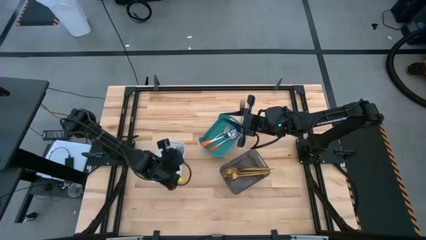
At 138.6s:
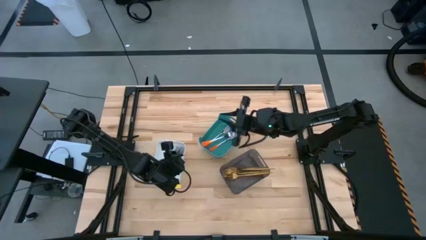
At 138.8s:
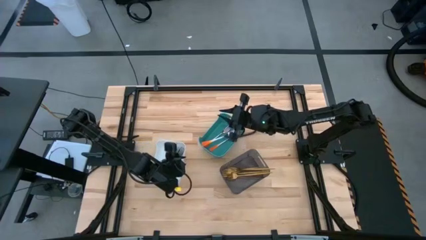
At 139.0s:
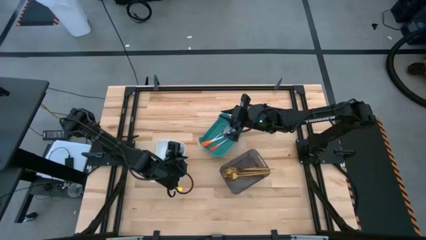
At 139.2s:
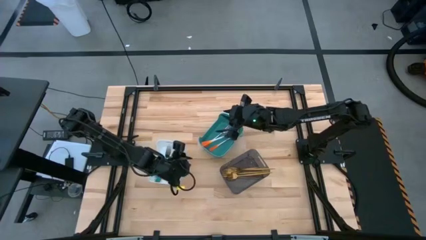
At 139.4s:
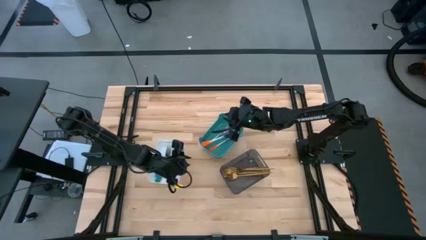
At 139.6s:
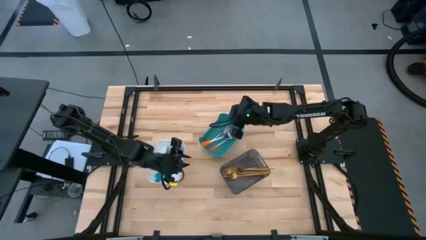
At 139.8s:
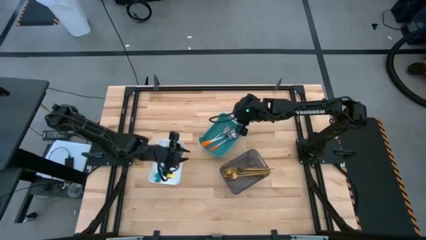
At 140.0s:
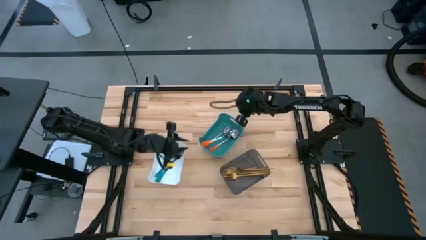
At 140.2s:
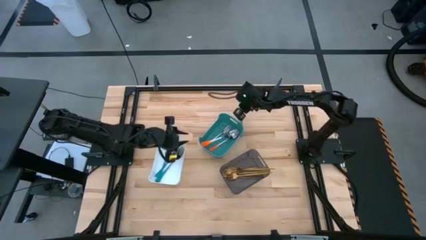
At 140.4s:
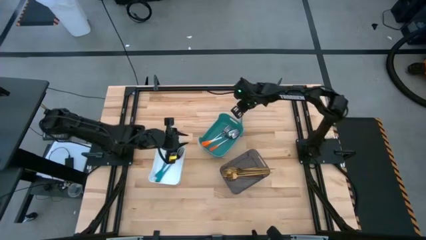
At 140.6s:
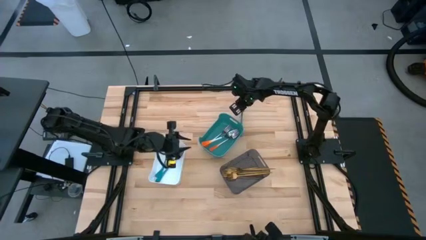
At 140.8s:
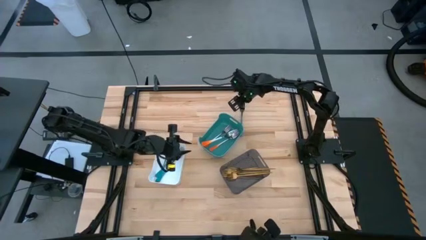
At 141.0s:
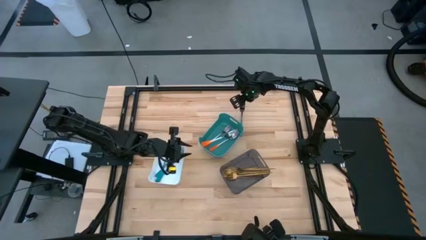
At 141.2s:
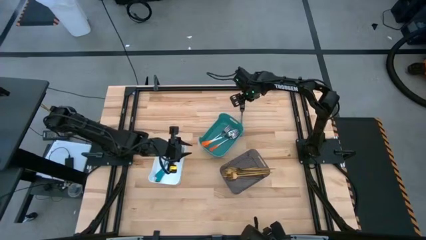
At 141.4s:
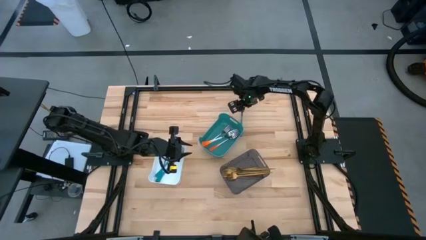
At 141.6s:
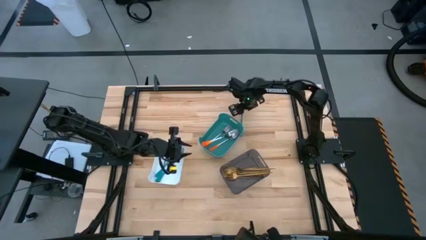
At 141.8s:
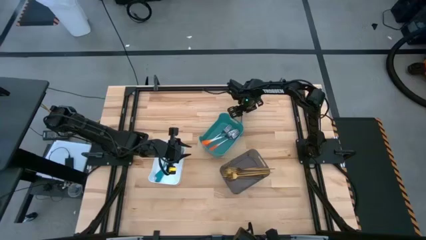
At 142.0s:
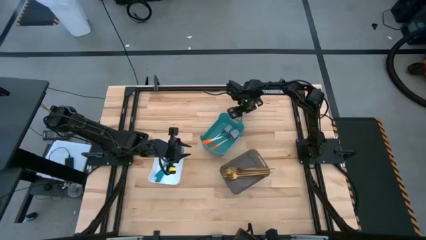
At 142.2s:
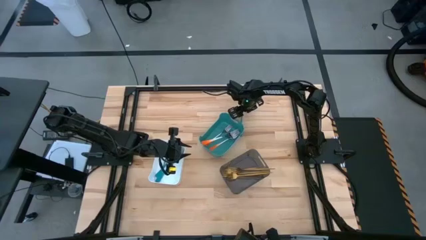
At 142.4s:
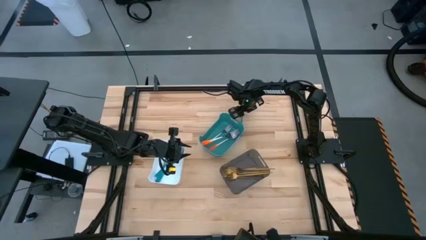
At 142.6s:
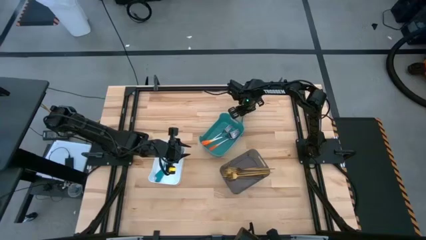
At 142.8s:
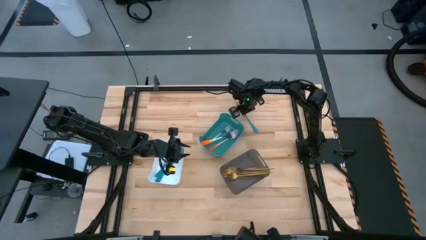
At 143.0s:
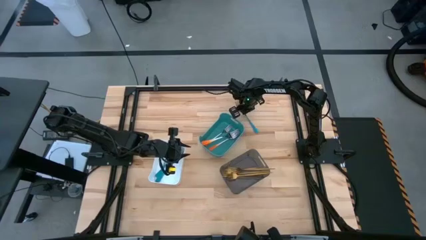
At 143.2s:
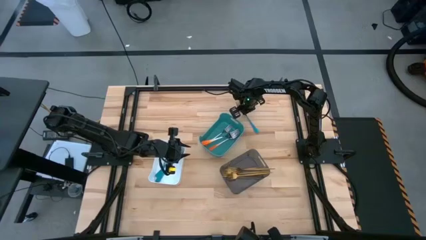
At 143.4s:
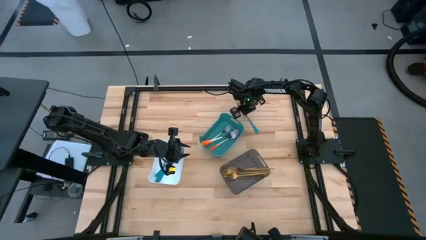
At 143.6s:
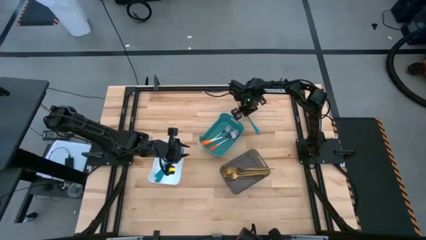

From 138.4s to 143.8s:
Task: Sort silverware by color (type)
Put the blue silver fork into the white bin

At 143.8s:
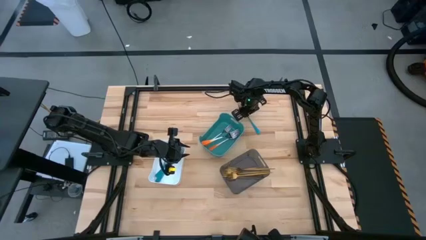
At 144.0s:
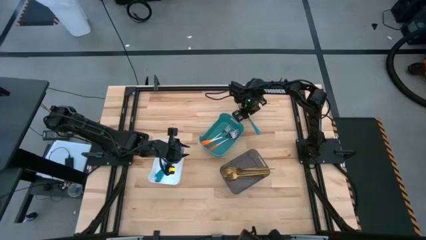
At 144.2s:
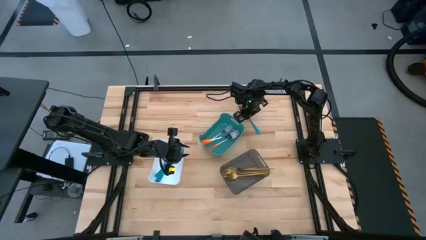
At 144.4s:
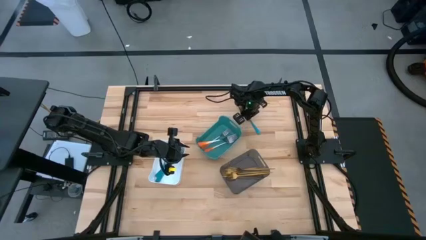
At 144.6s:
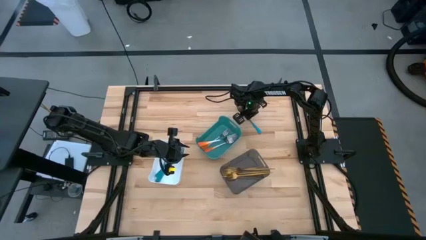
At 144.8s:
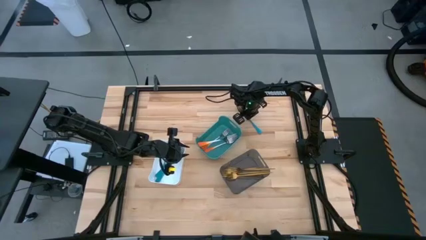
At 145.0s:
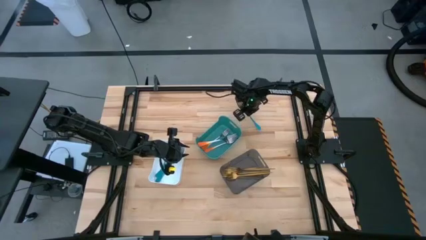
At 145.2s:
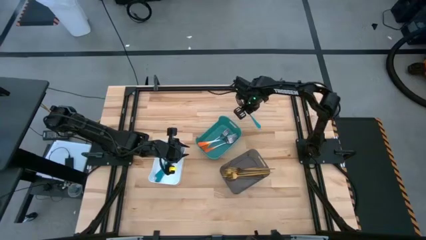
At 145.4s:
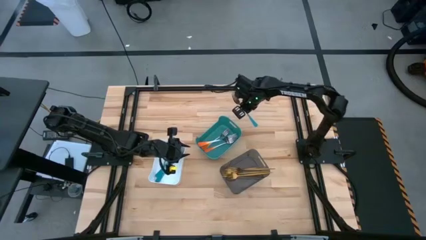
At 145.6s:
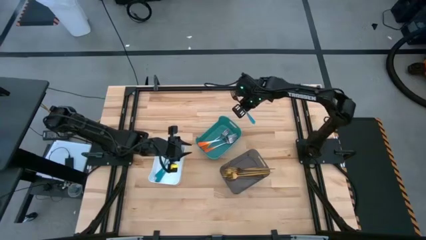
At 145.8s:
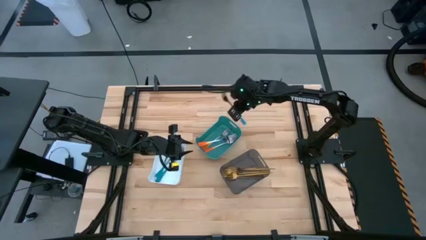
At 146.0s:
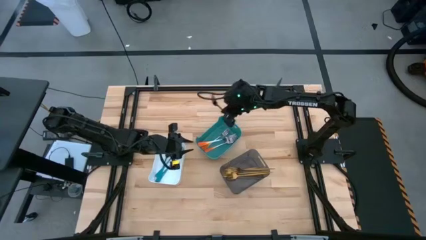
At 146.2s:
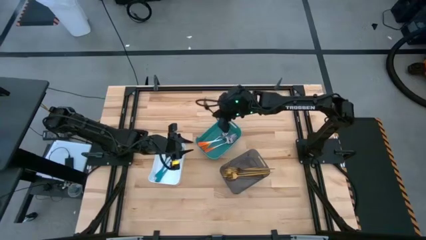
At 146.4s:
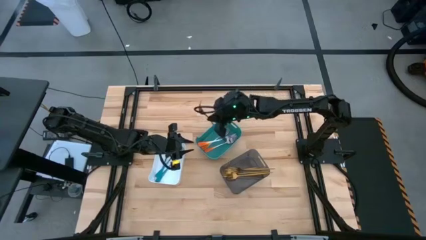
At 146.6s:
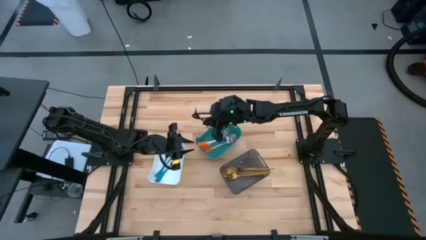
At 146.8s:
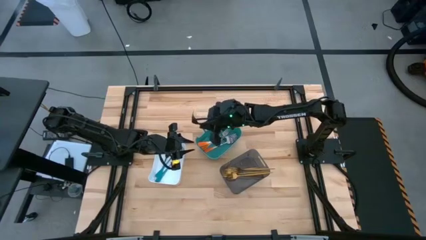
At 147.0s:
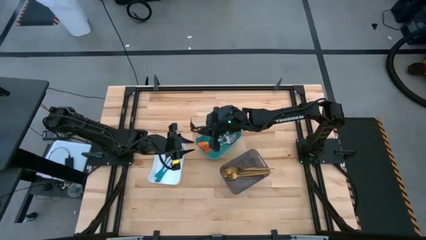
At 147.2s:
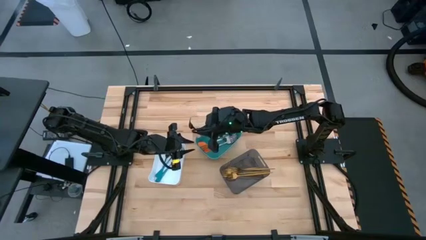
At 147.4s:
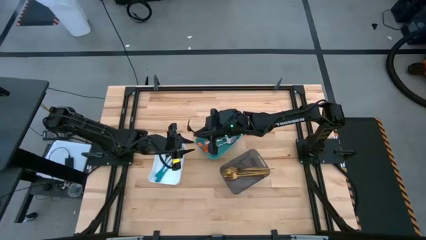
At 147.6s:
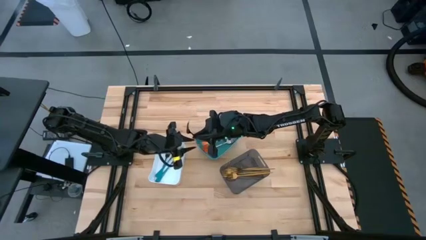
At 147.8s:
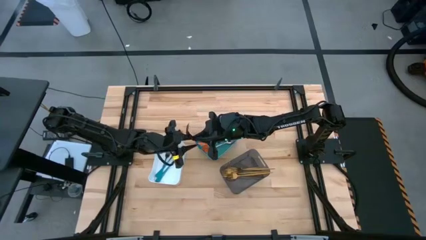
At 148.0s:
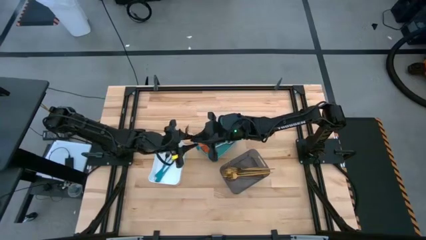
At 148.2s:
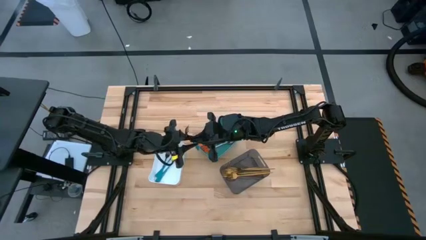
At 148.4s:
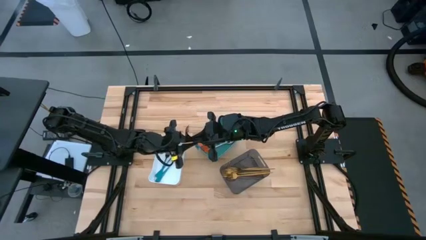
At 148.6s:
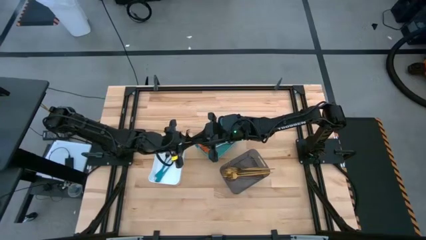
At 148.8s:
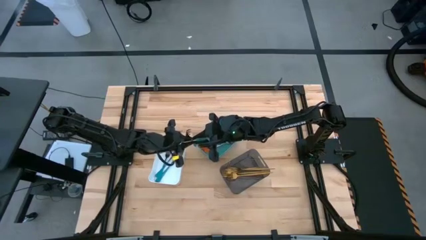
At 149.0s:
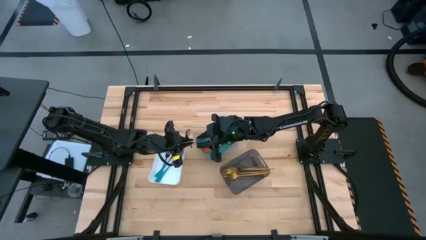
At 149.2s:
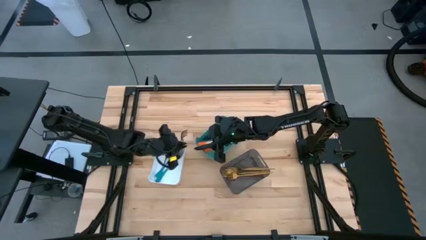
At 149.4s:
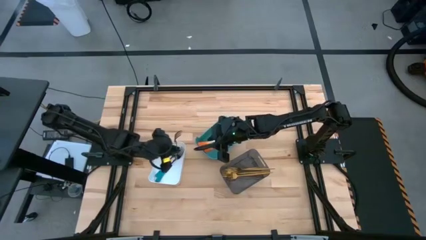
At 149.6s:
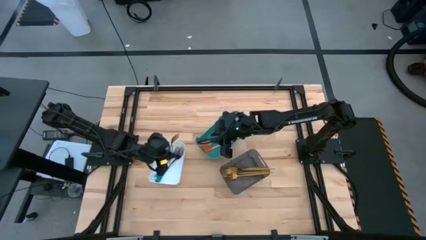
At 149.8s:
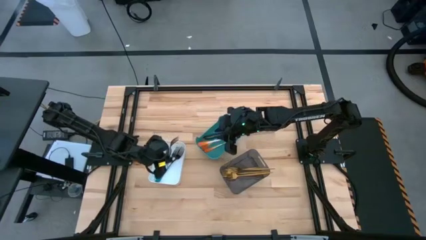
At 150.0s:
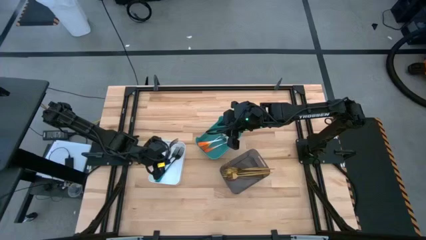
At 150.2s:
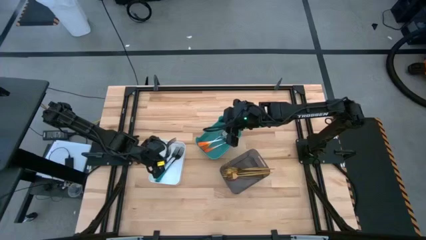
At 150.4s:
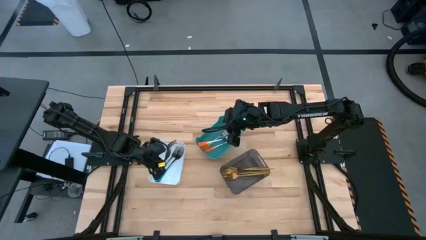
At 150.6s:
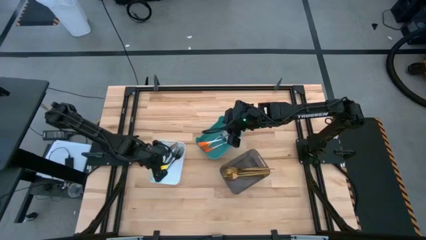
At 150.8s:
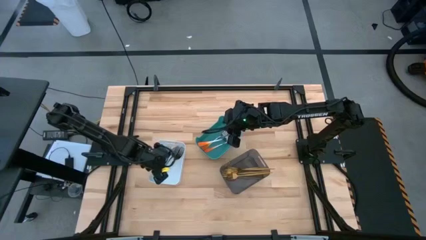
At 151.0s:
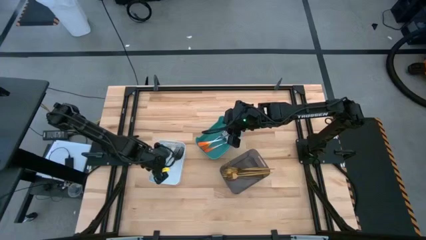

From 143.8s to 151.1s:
Put the blue silver fork into the white bin

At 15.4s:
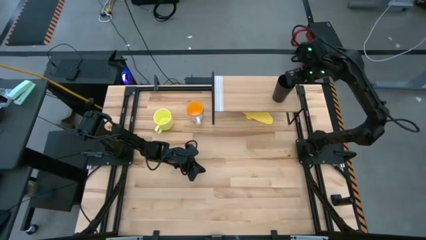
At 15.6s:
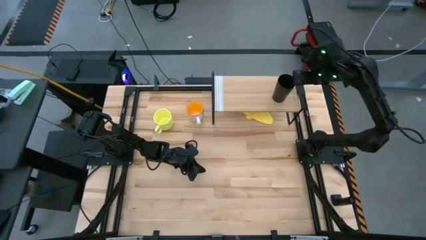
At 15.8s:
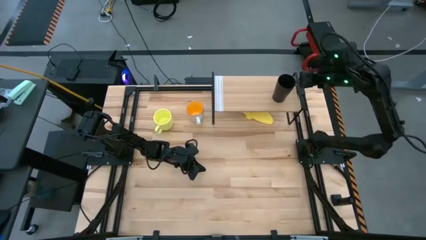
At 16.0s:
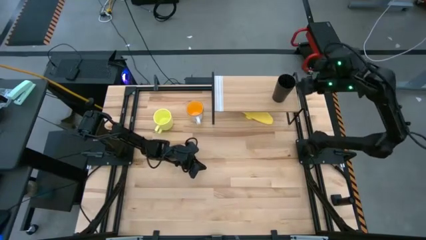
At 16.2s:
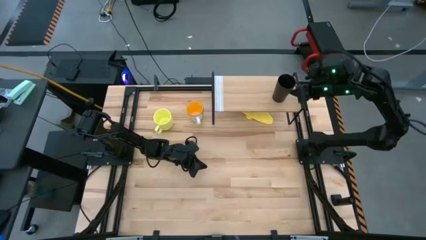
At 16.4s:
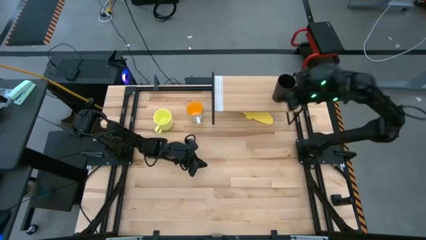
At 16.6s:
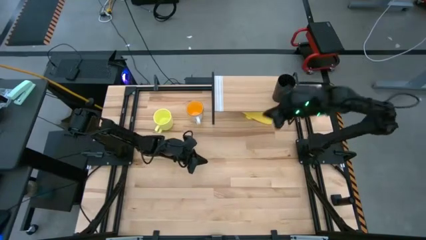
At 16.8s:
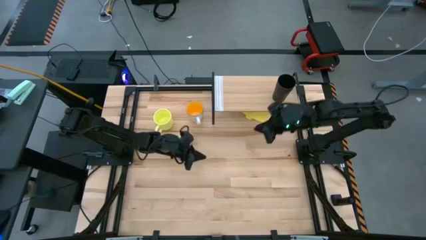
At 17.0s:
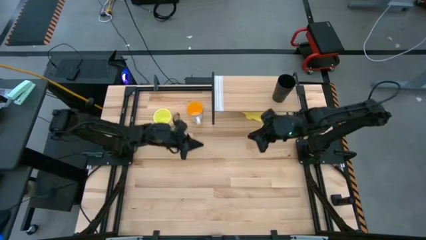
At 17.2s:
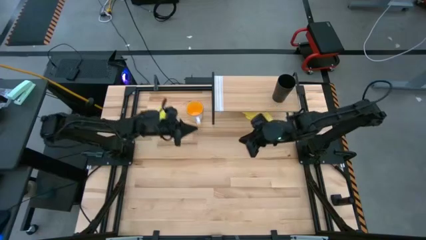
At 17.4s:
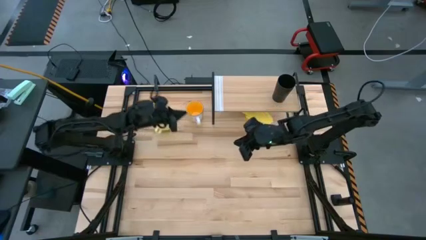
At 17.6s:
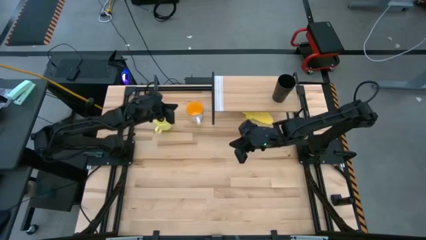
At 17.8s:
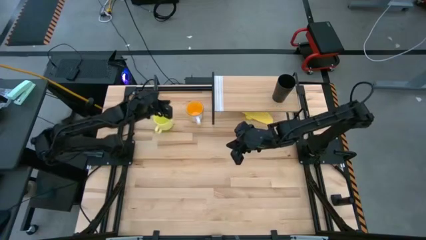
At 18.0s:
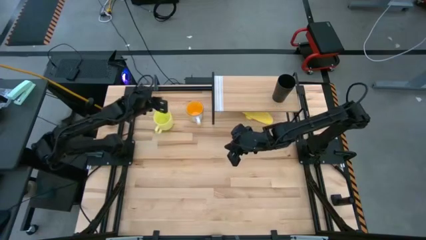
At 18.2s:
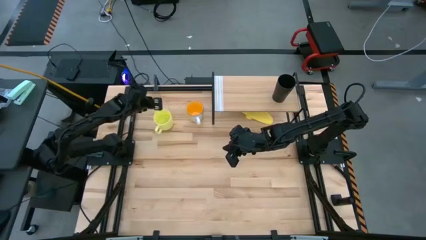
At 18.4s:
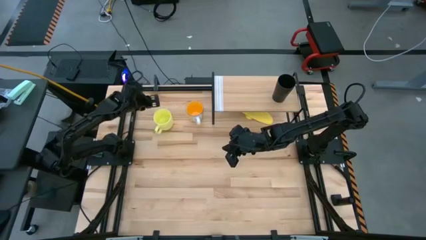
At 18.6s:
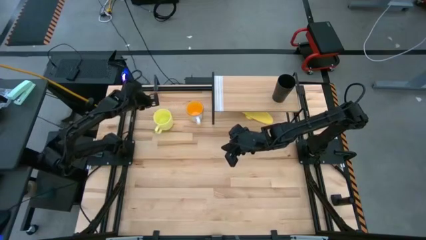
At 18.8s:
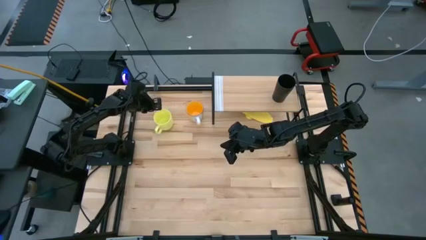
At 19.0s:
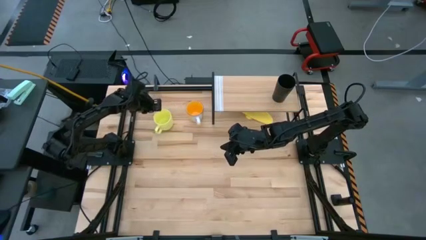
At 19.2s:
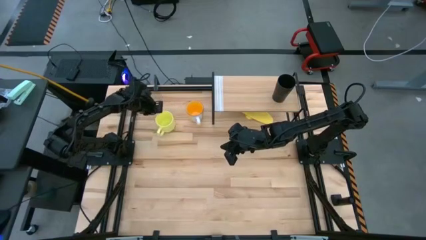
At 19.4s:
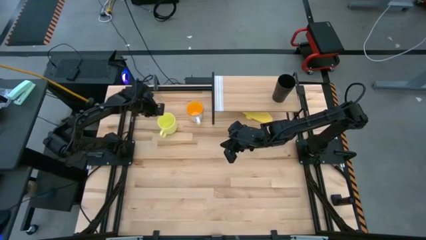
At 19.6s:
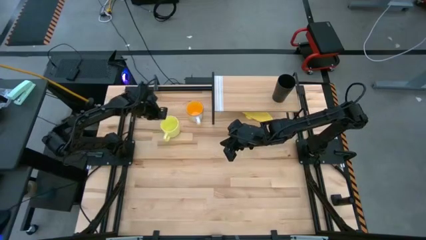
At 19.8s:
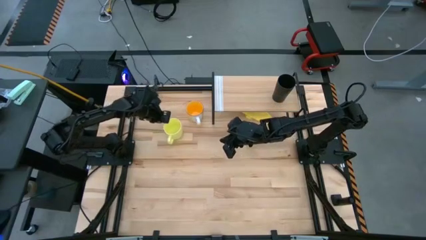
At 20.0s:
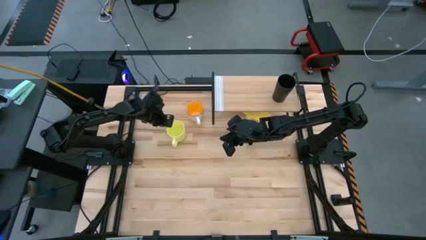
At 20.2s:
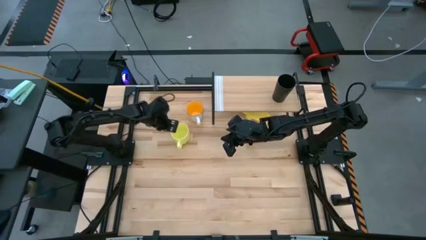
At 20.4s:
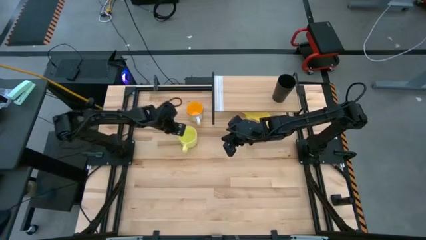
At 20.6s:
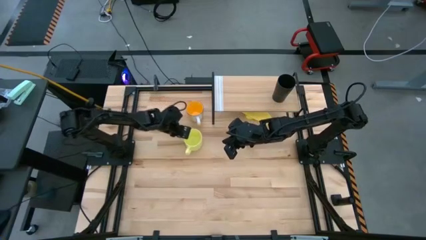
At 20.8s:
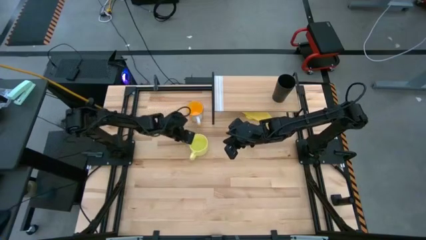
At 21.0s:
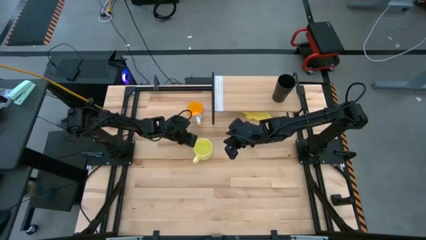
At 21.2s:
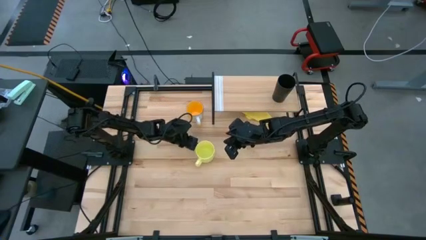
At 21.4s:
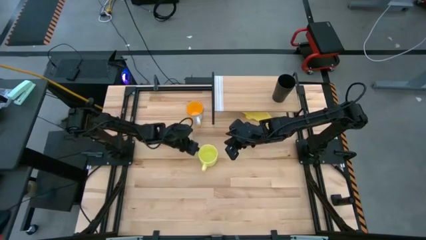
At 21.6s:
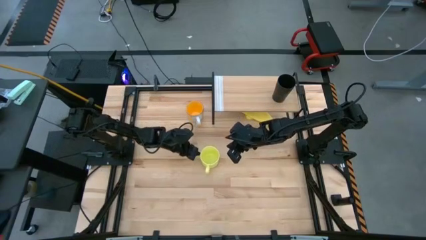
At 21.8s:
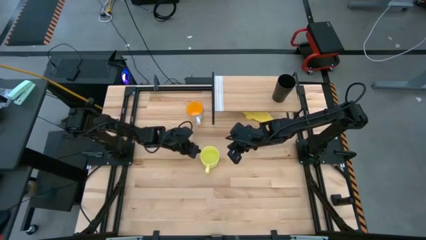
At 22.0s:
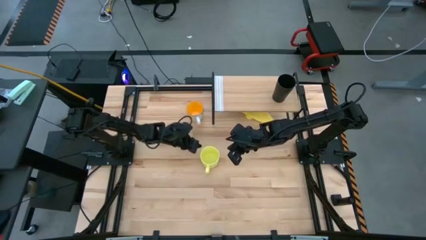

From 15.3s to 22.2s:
Task: Stack small to large cups/mugs on shelf
Move the yellow mug to the center of the table
